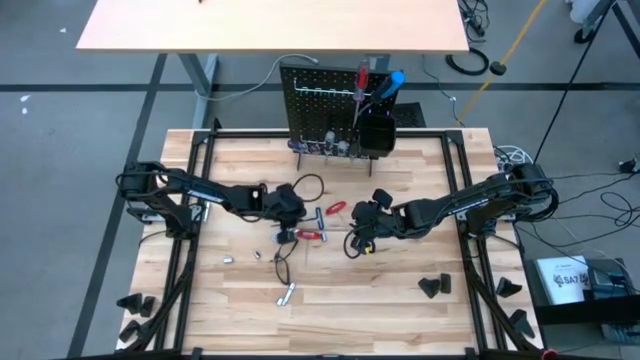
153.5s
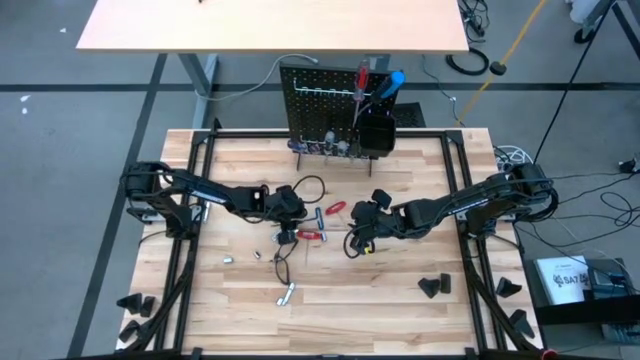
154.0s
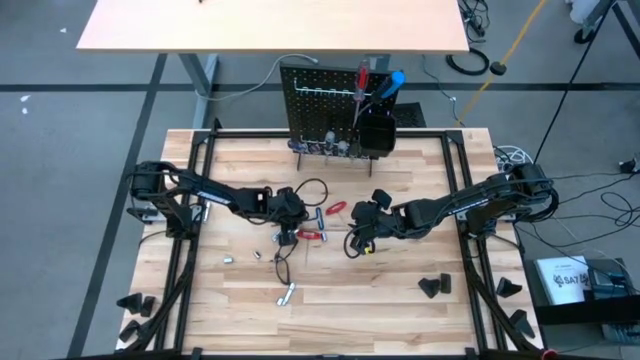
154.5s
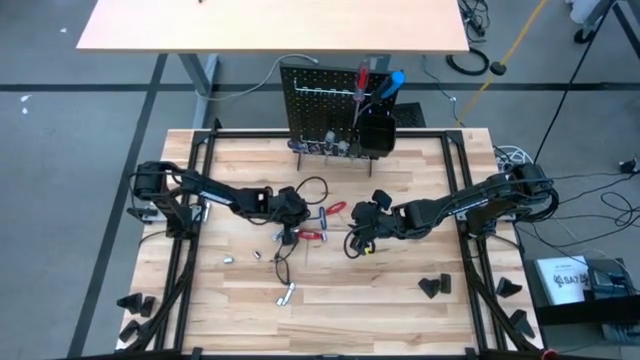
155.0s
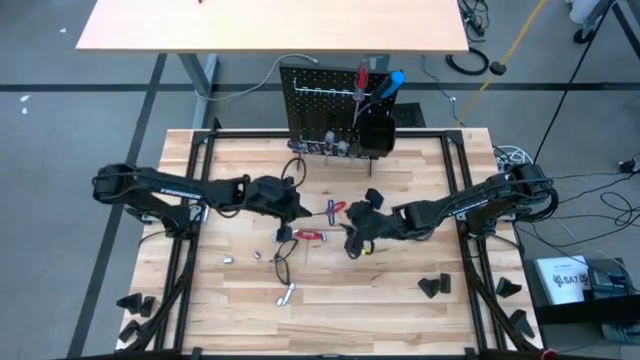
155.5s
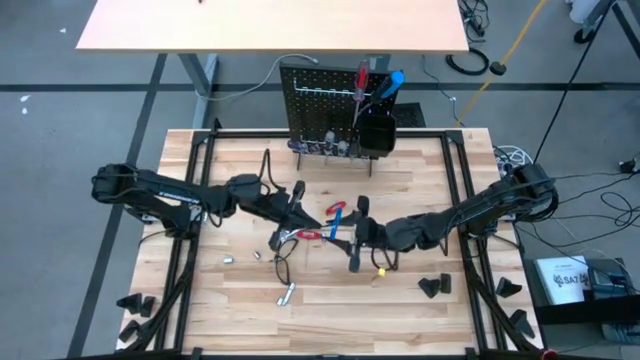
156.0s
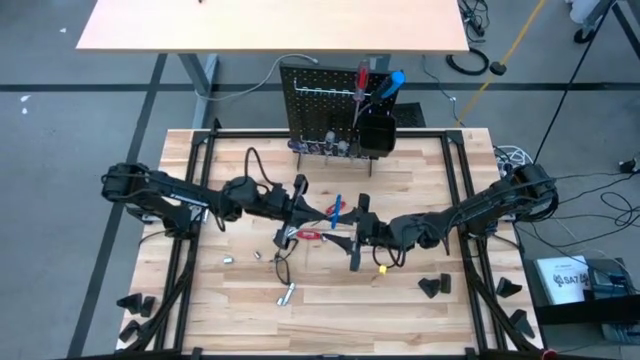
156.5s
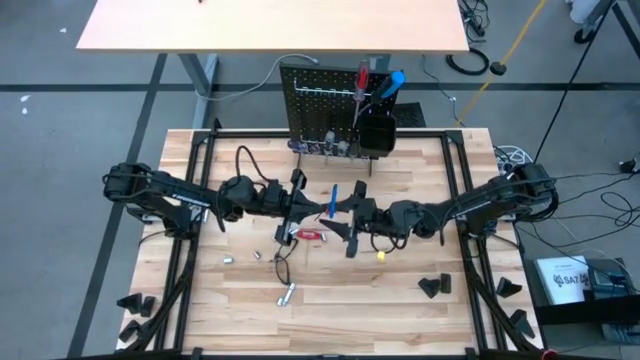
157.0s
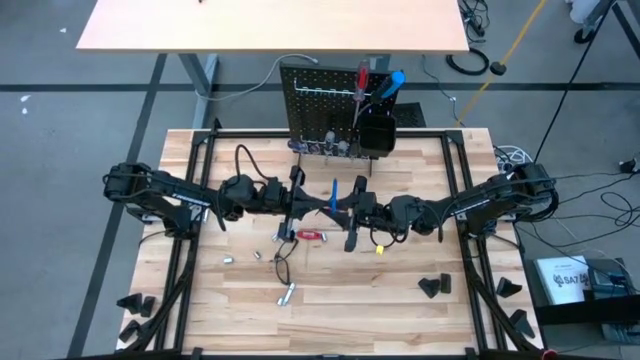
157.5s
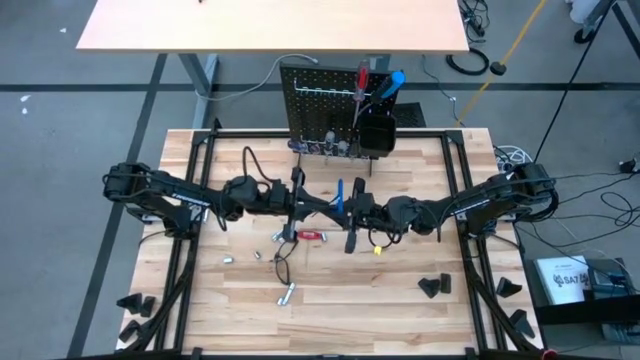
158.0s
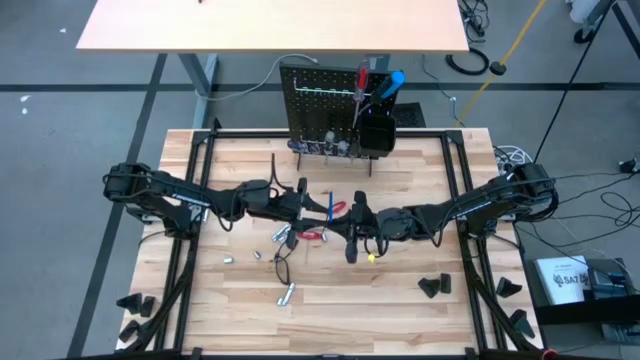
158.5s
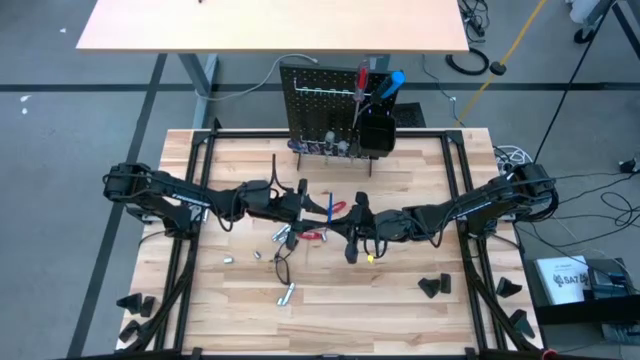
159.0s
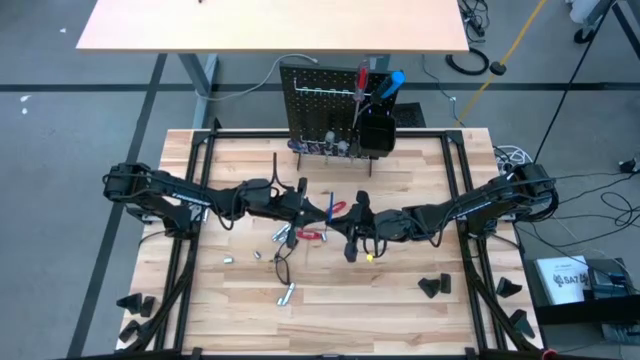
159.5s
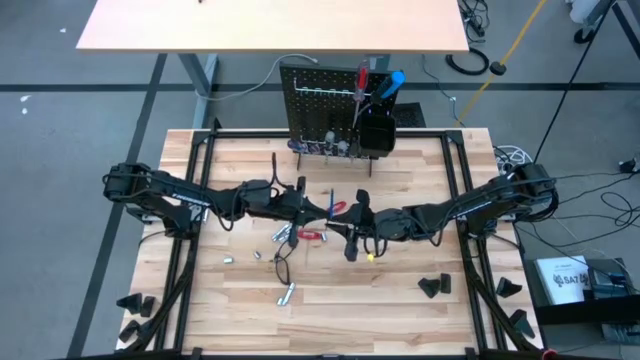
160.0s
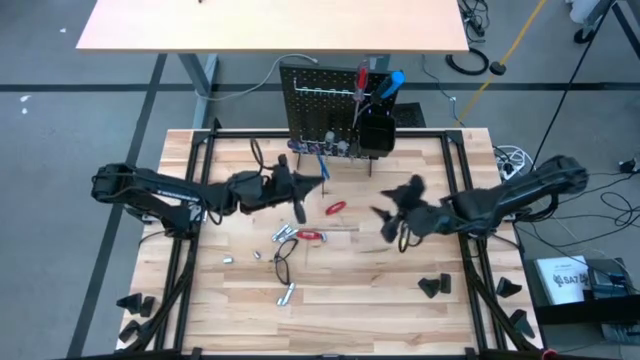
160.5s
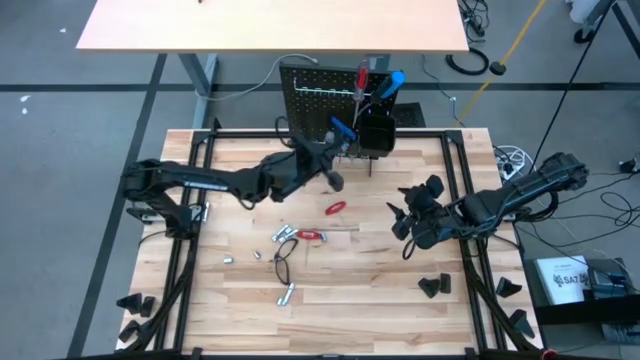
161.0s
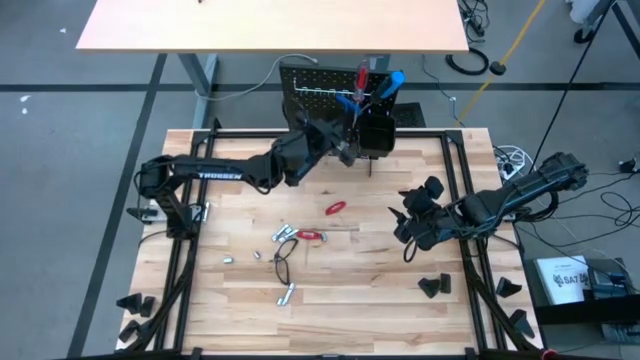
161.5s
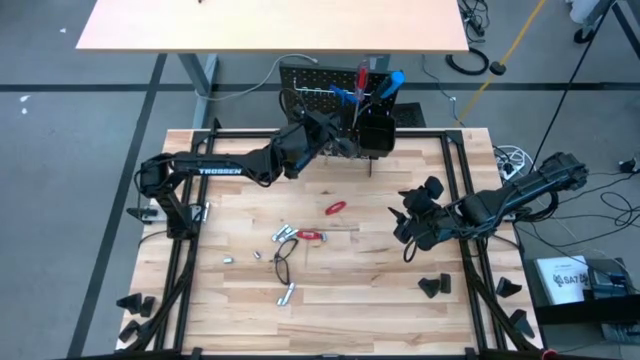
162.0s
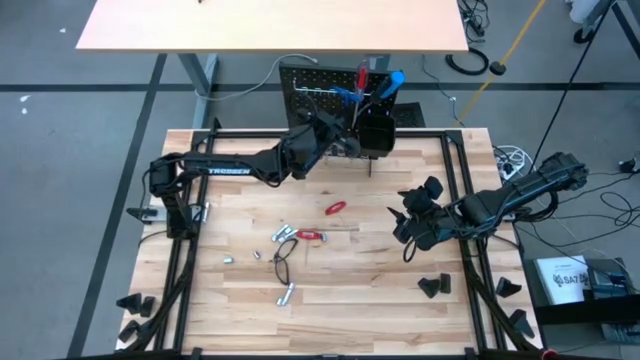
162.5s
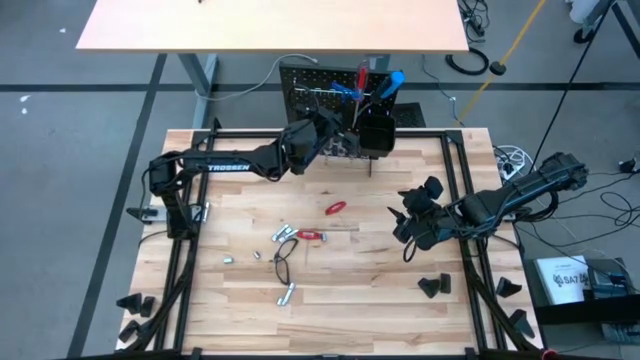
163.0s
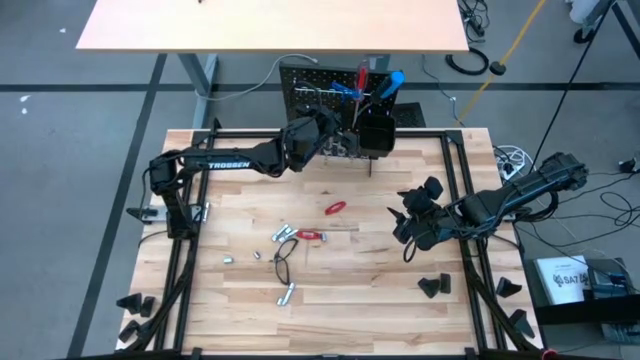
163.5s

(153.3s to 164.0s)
Task: Hang tools onto peg board
Hang the blue pick tool onto the peg board

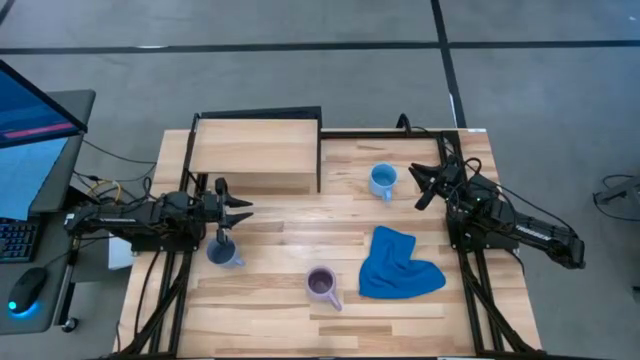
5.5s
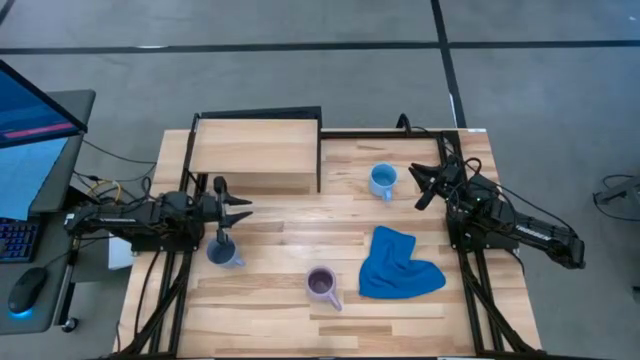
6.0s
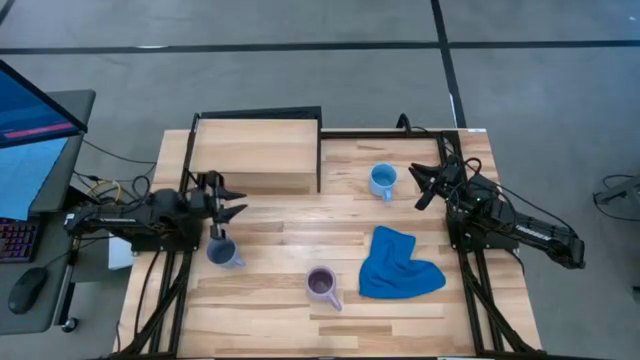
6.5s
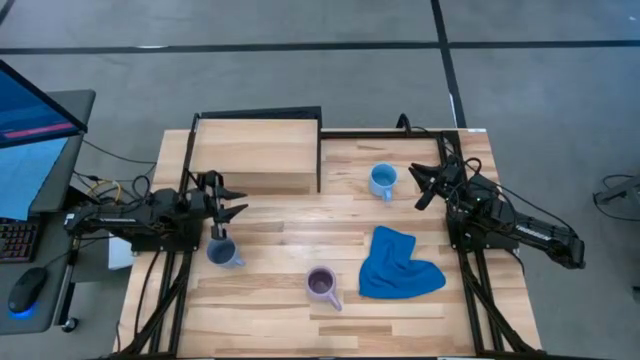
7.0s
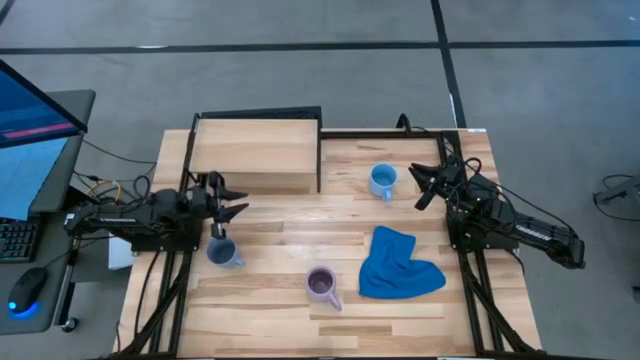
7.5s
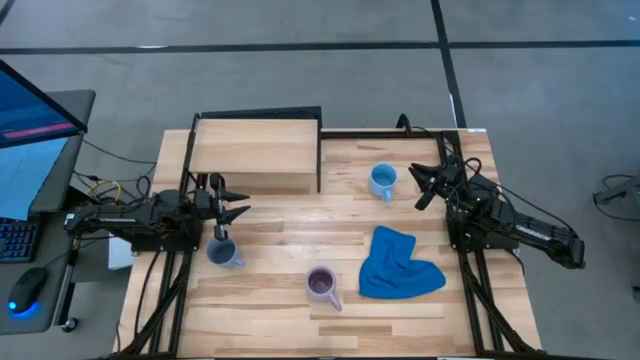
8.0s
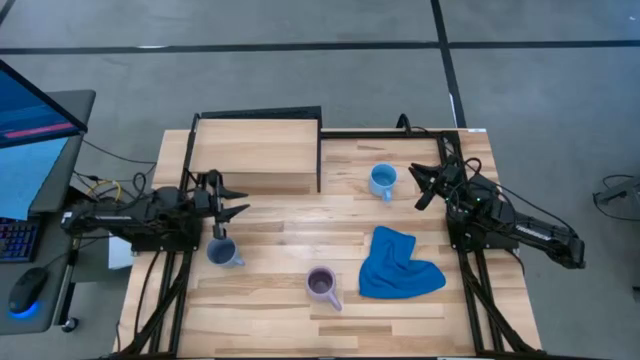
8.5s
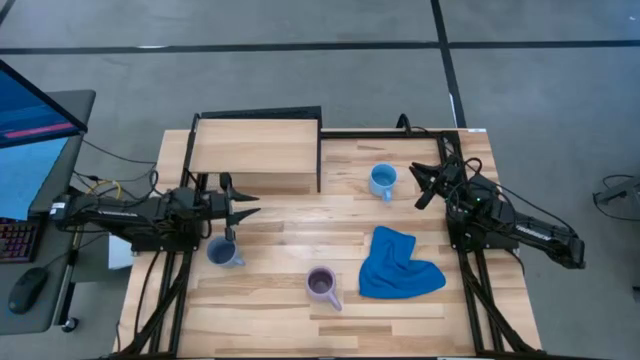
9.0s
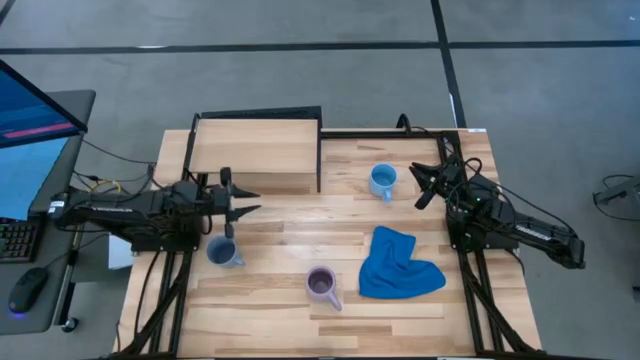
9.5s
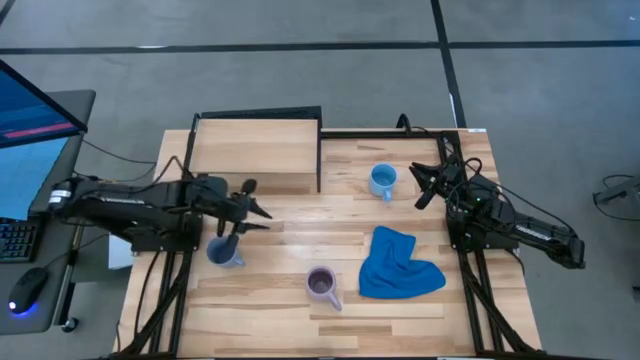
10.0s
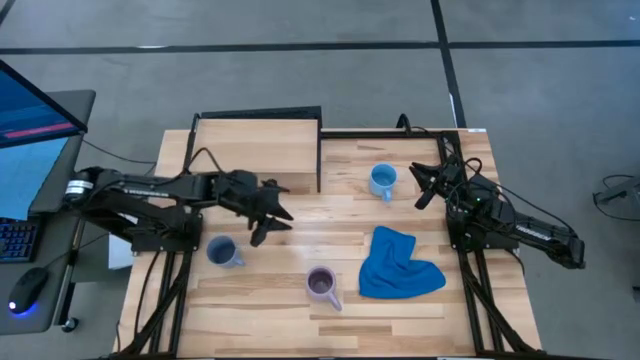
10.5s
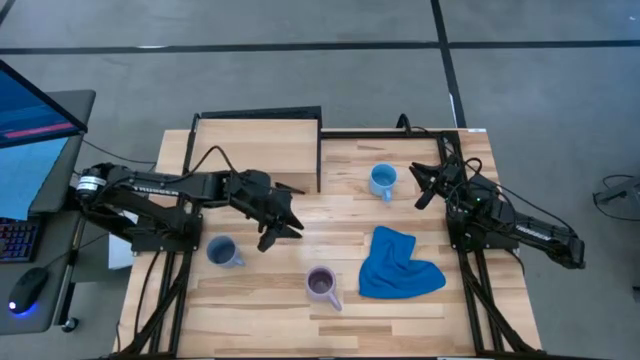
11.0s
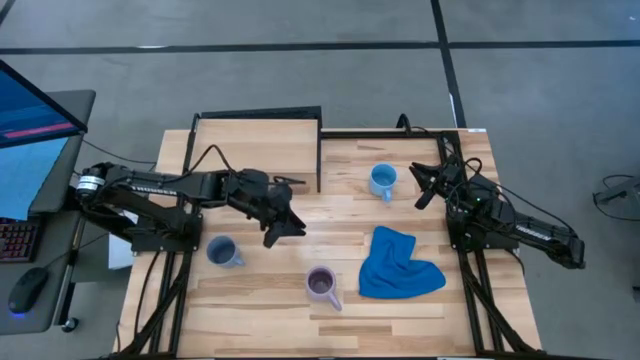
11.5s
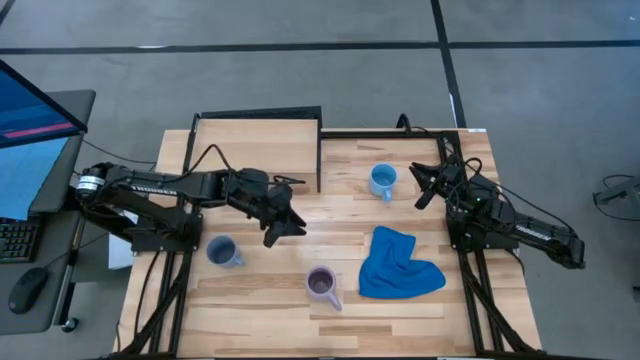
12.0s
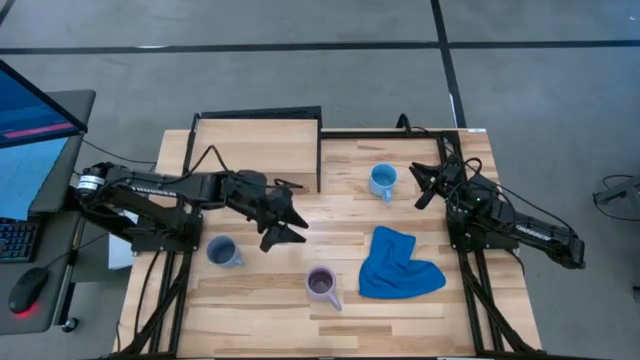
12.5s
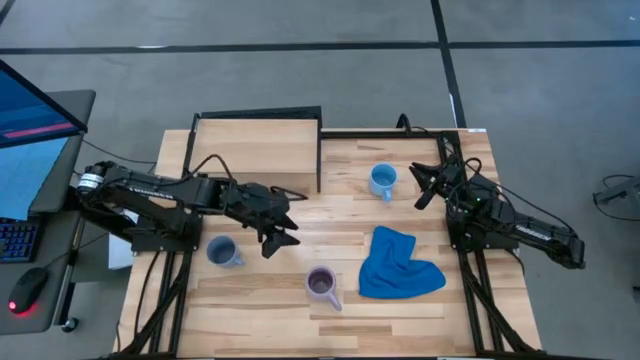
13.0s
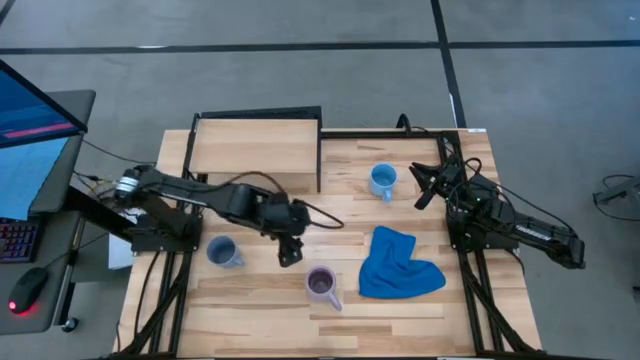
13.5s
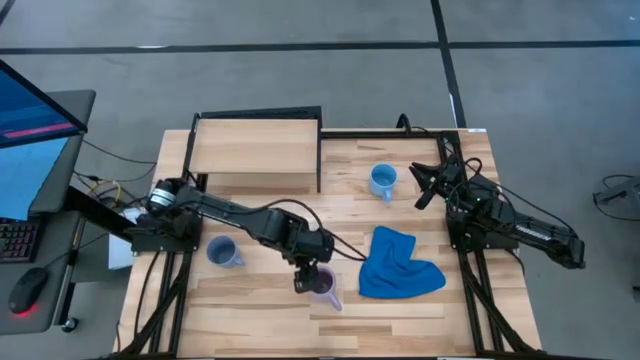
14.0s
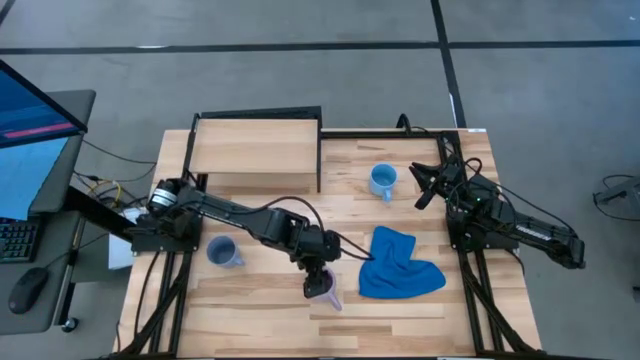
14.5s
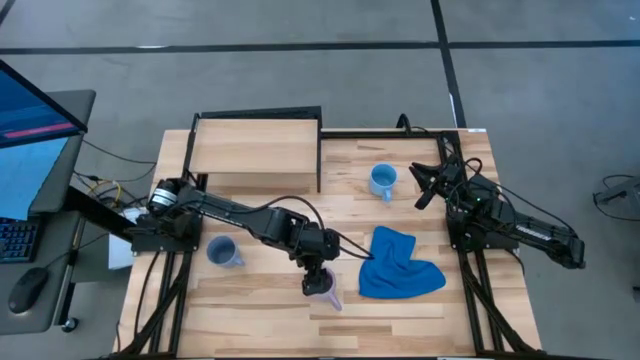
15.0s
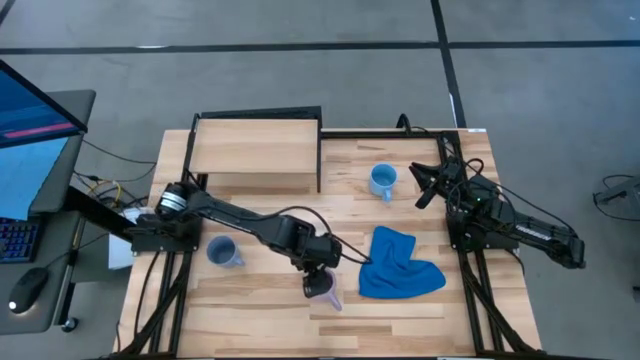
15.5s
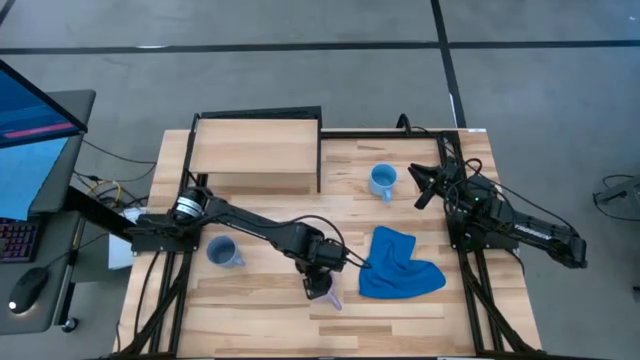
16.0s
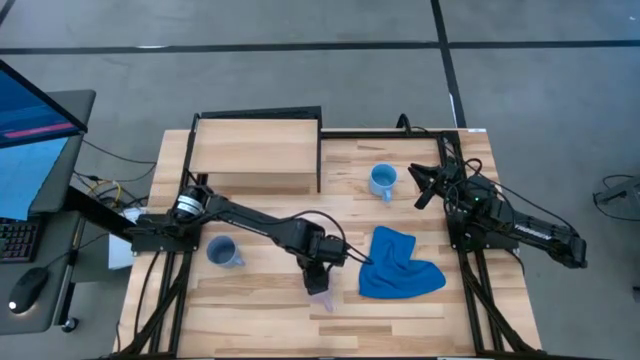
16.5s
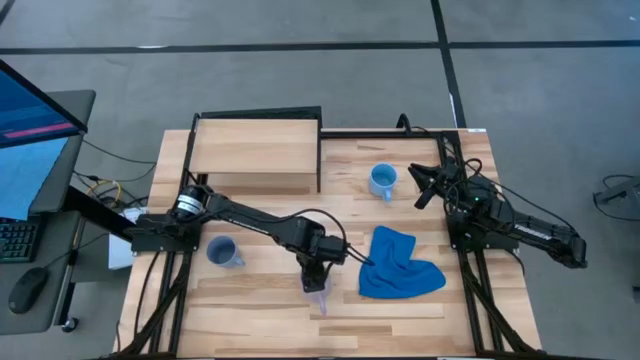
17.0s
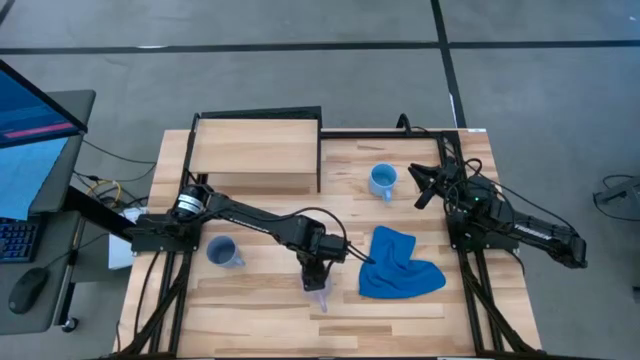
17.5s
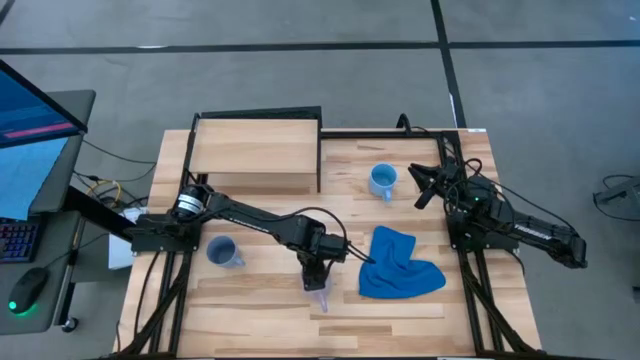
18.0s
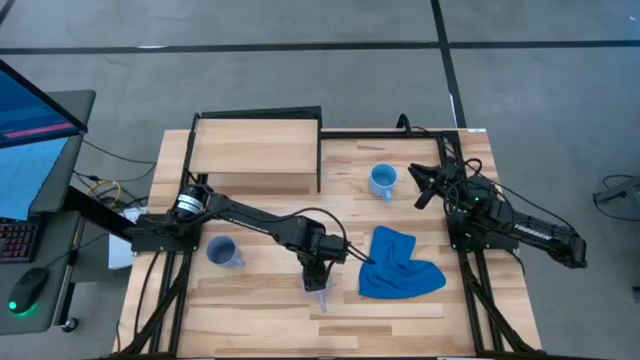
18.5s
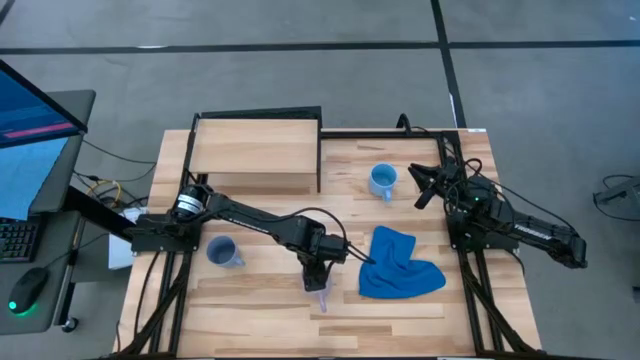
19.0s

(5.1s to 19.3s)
Task: Stack small to large cups/mugs on shelf
Put the pink cup on the shelf
